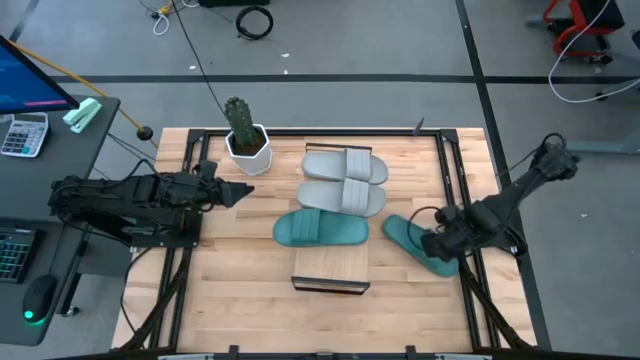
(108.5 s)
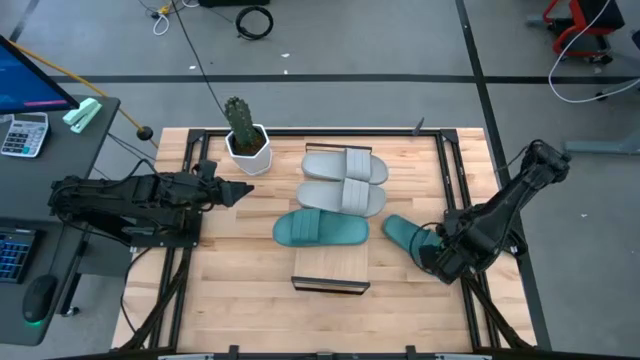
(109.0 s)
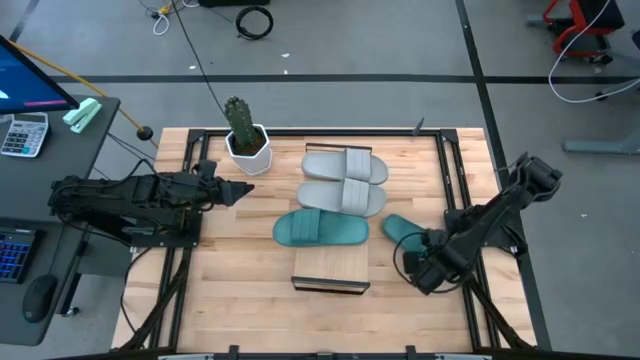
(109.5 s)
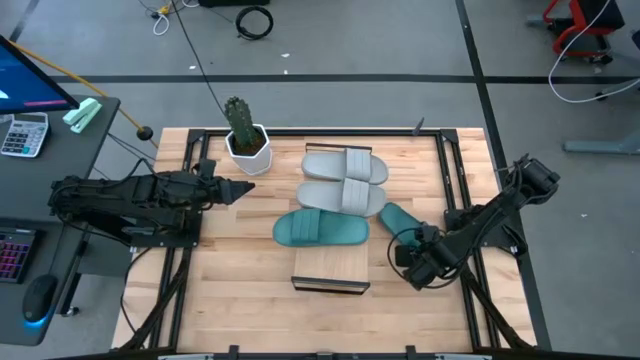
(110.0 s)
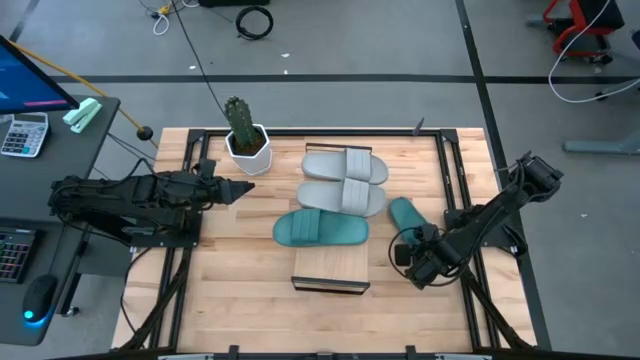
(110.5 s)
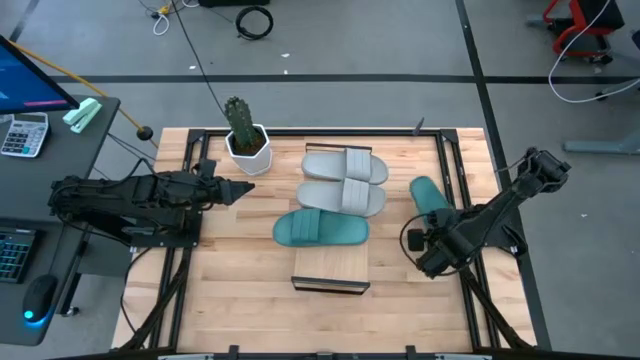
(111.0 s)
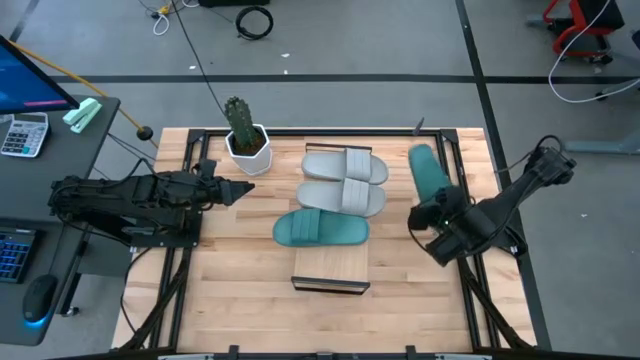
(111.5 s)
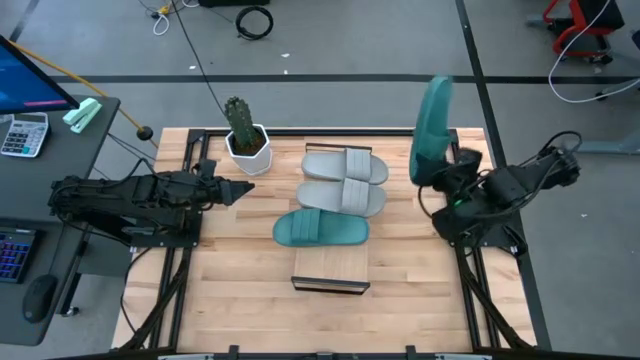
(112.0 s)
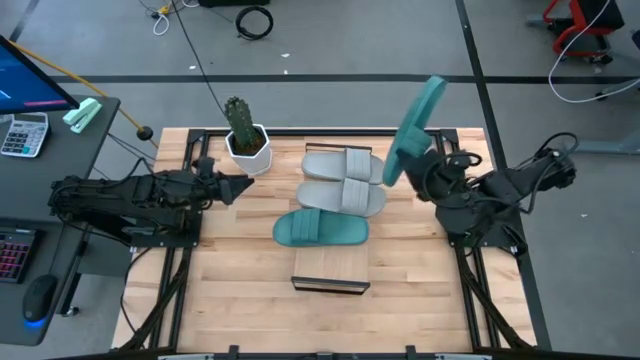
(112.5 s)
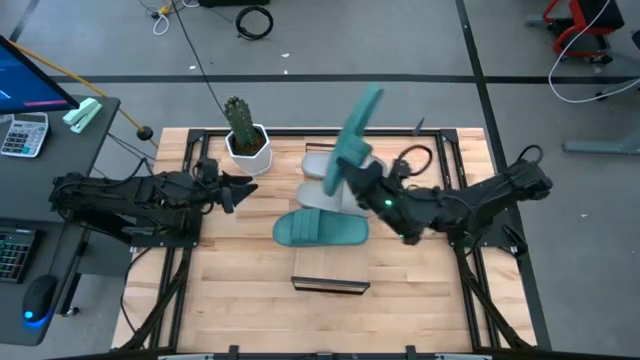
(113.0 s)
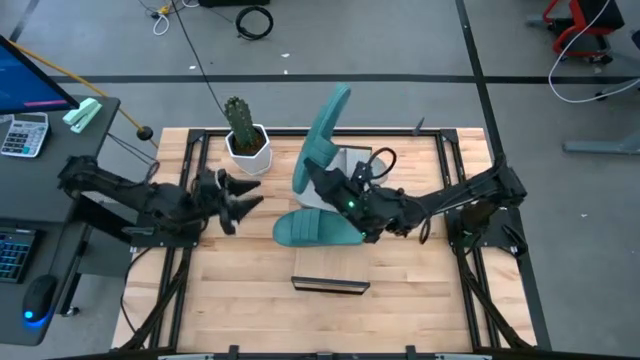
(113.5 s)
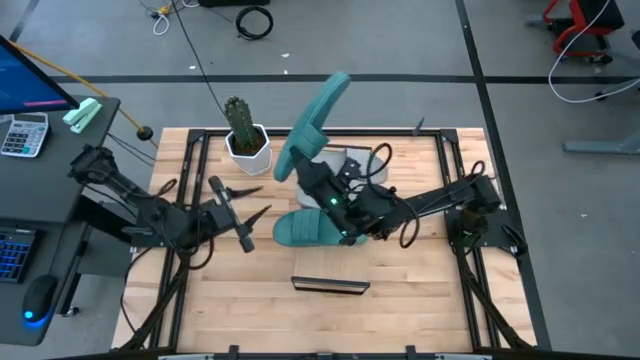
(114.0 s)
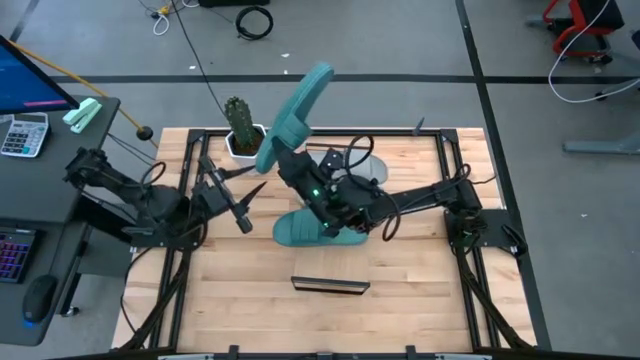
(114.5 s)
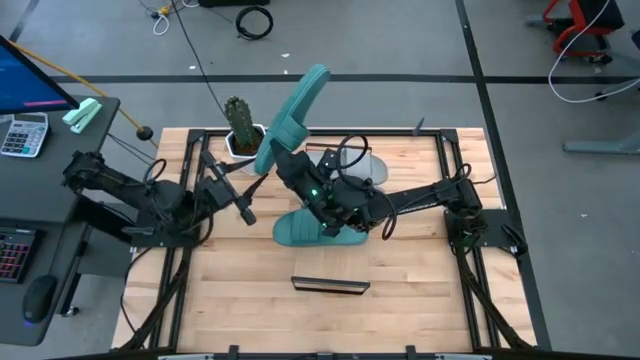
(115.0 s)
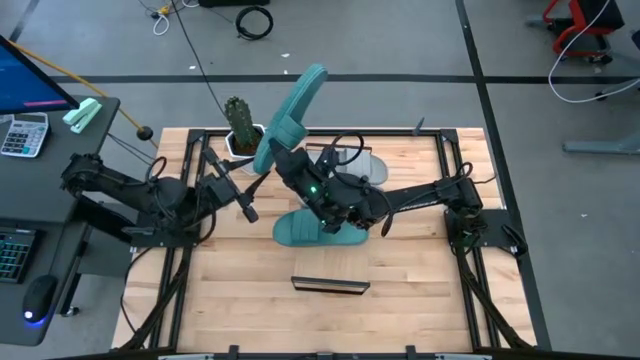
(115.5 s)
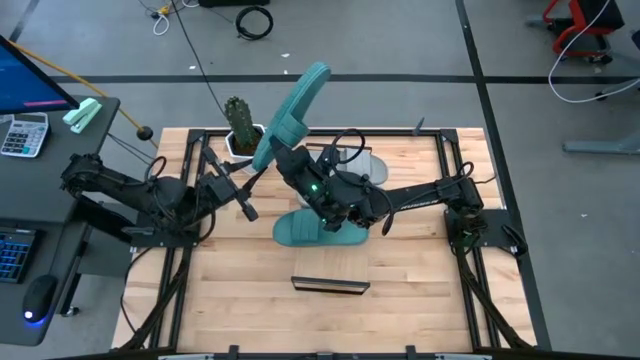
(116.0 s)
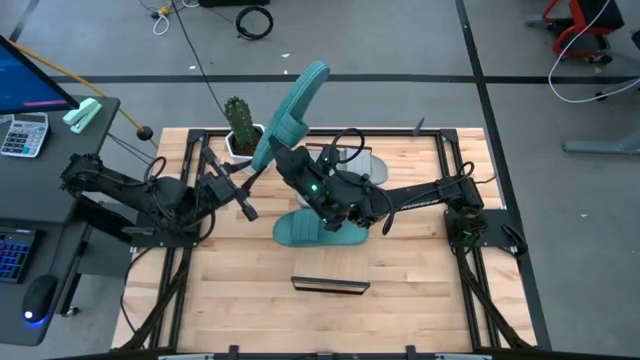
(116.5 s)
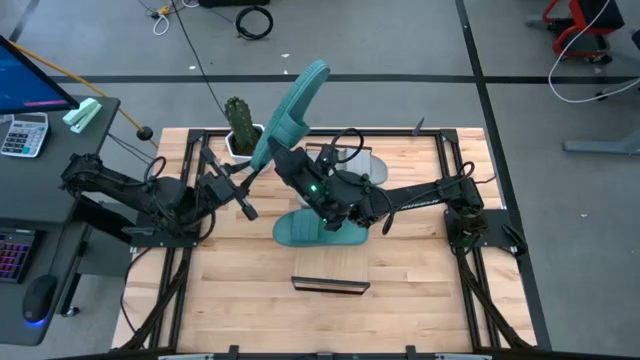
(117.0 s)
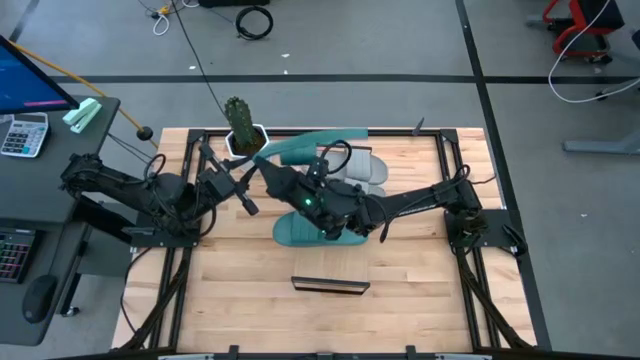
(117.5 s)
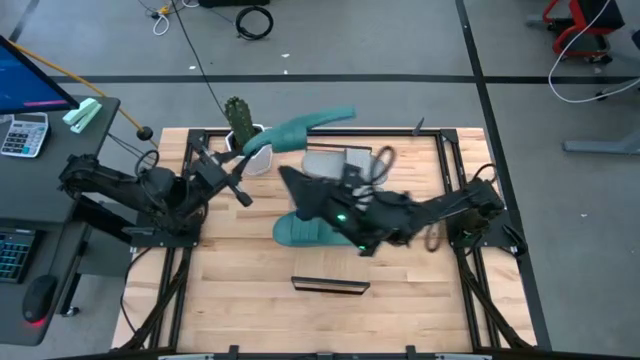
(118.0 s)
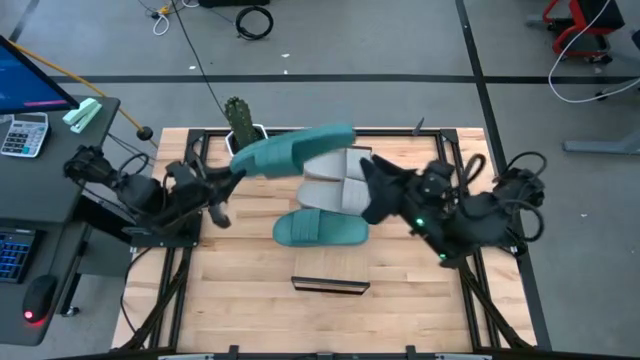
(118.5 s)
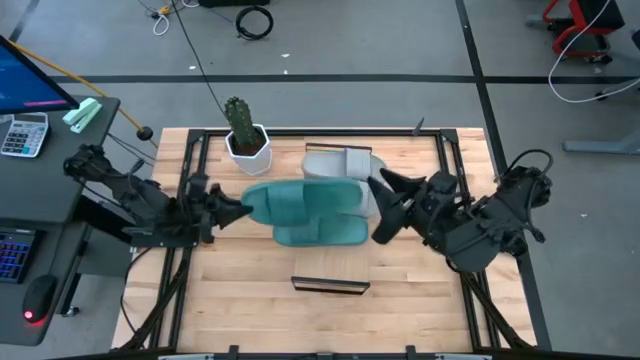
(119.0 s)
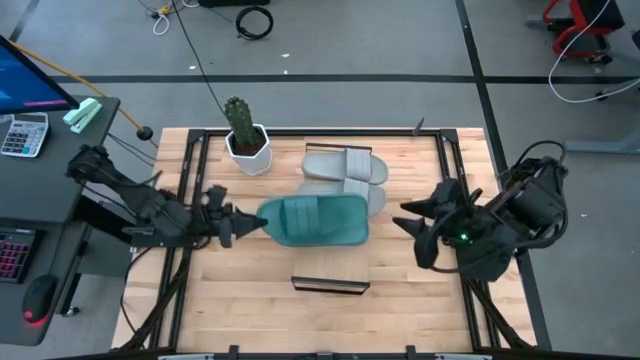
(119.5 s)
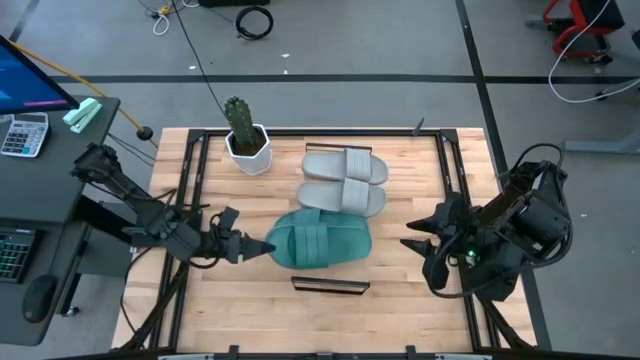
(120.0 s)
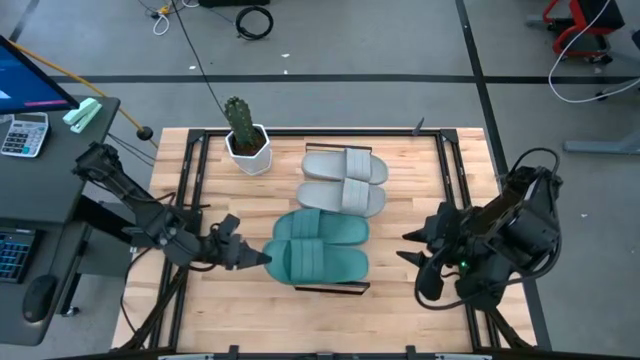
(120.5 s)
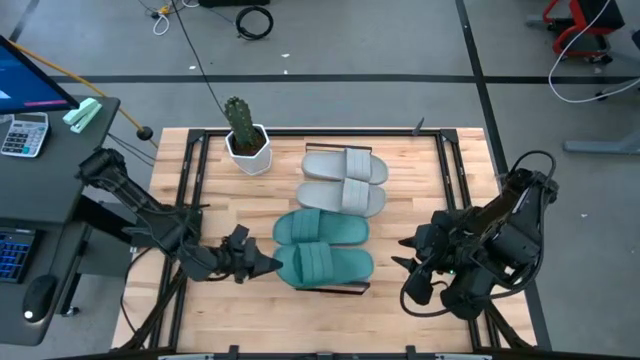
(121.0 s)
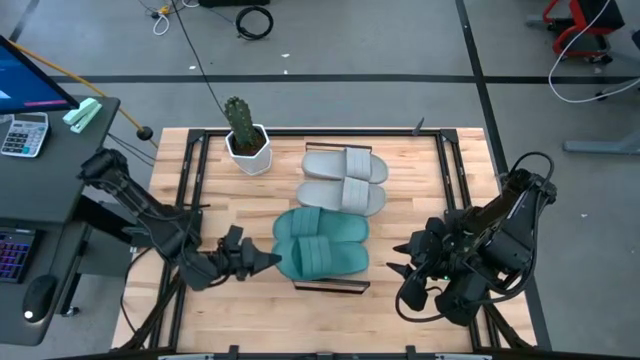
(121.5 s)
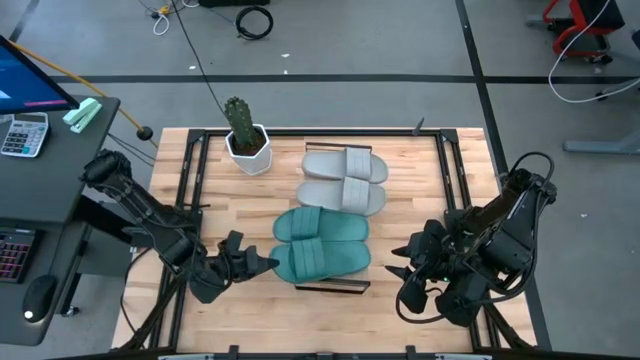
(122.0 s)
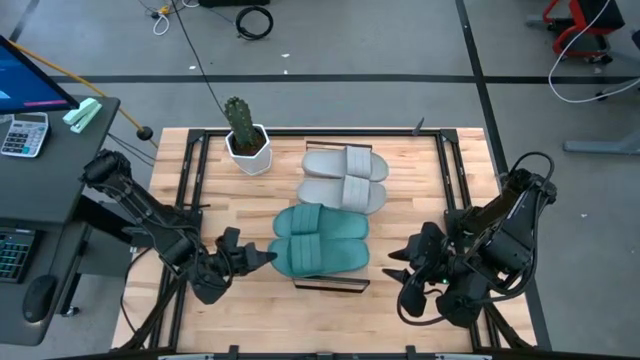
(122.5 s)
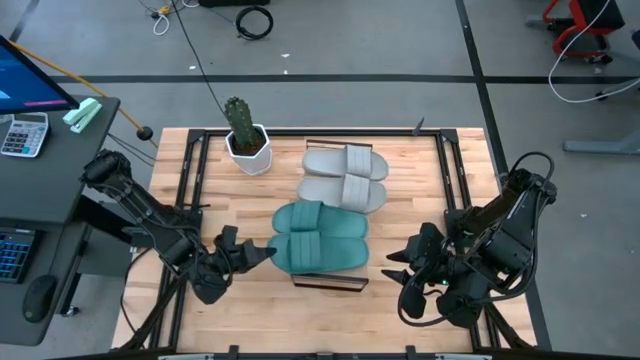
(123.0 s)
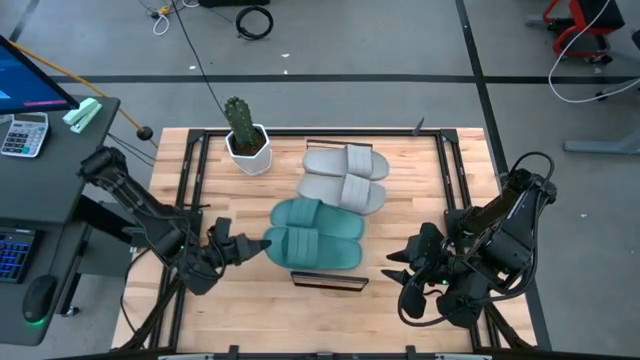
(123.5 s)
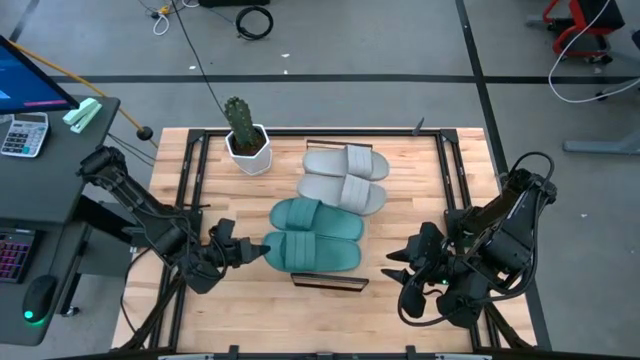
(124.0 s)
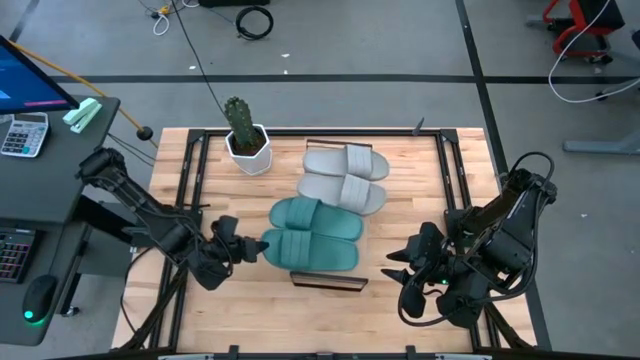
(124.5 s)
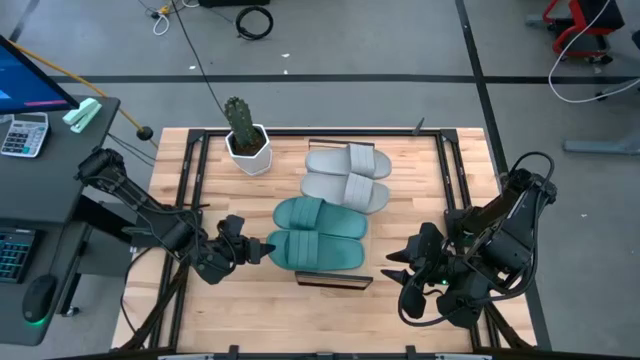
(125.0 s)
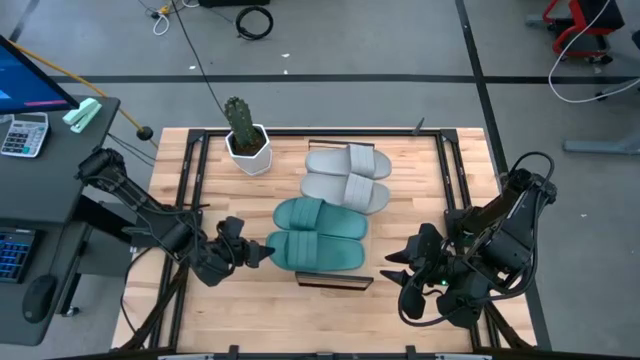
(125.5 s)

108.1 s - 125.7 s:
Task: Pick and place slides into the shelf
Put the green slipper onto the shelf

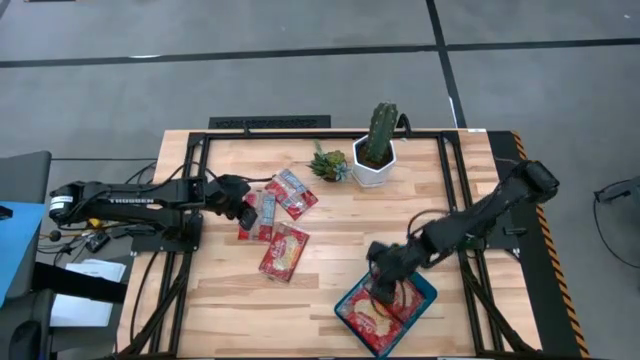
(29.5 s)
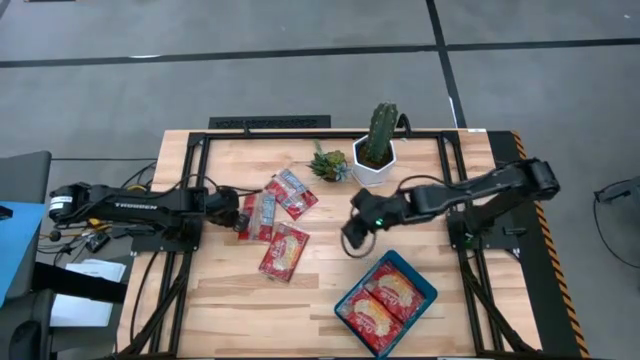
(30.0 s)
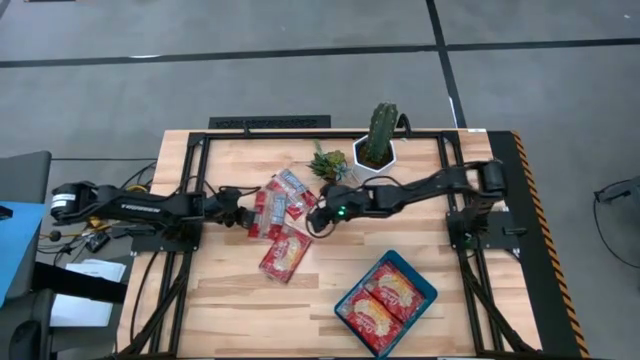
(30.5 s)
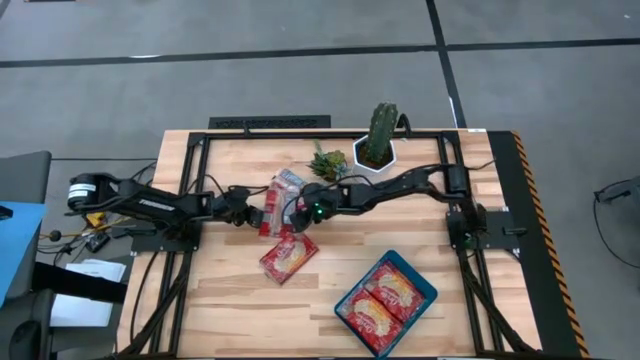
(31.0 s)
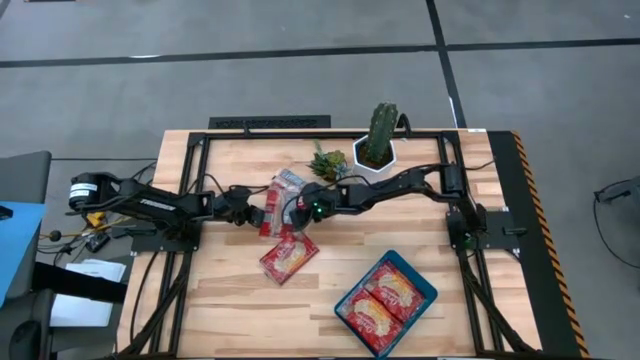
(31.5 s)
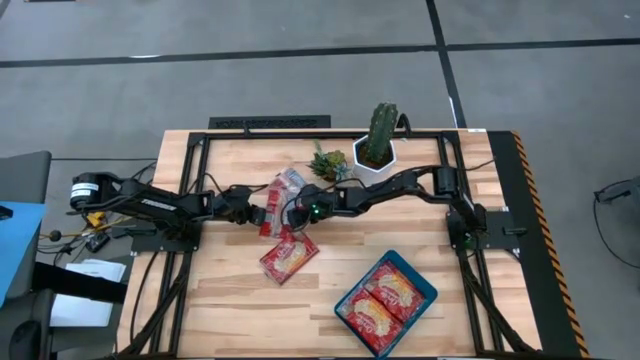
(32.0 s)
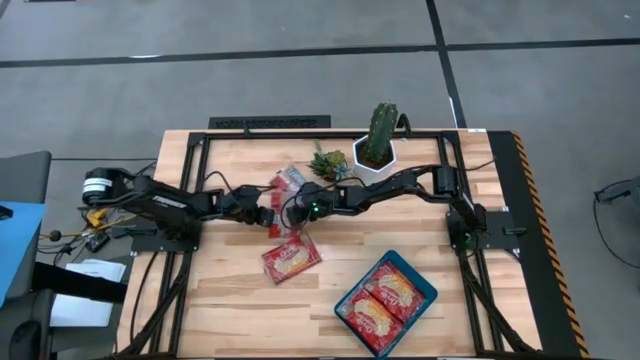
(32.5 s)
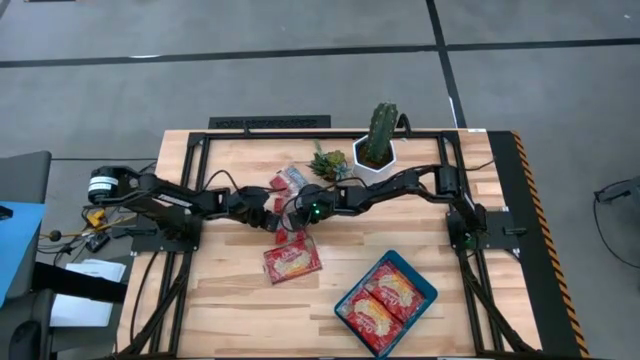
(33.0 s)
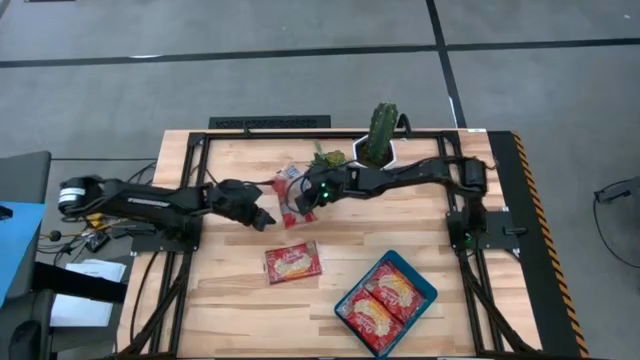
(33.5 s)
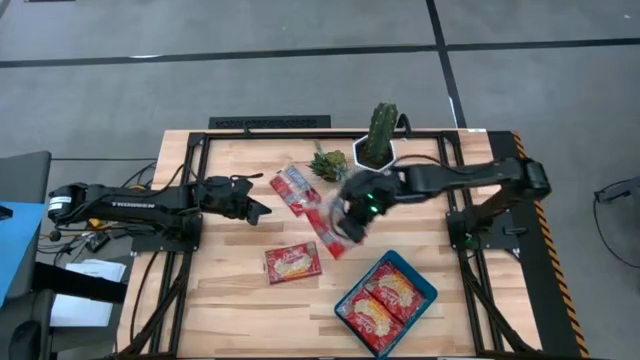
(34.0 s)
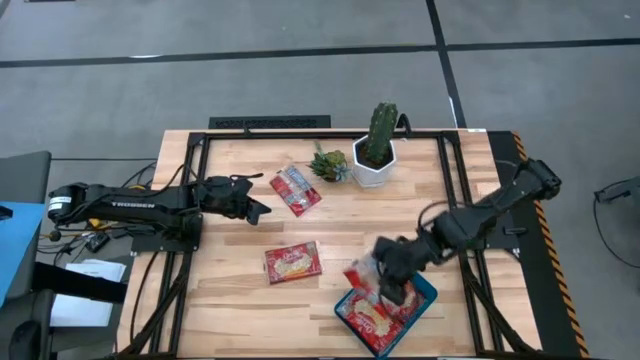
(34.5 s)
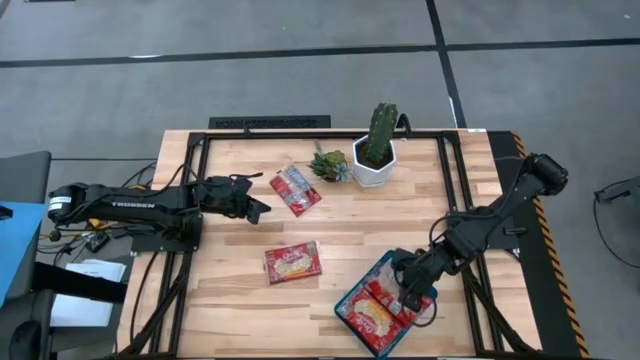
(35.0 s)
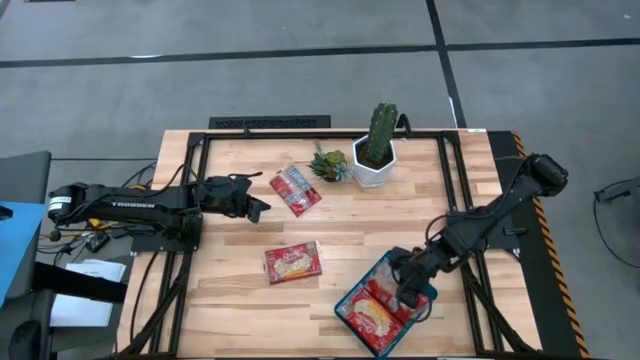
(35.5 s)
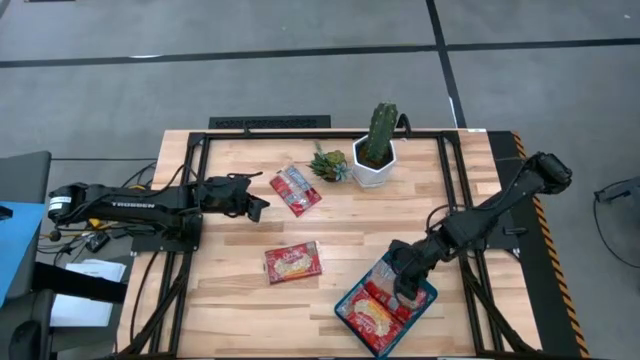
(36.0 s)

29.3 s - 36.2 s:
Task: Sort popcorn bags into baskets
Put the popcorn bag into the bin
